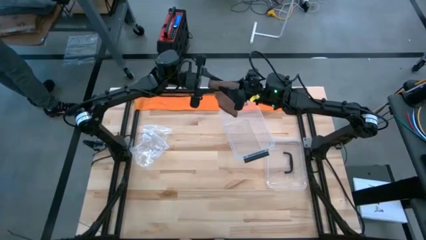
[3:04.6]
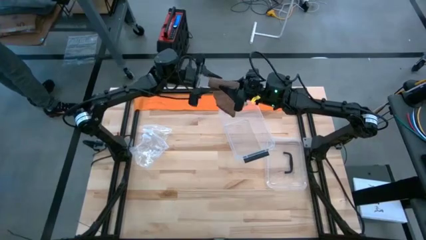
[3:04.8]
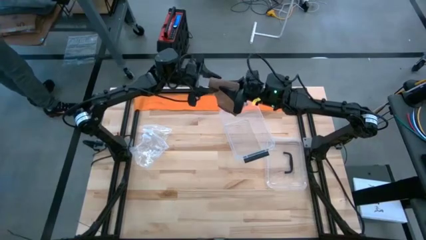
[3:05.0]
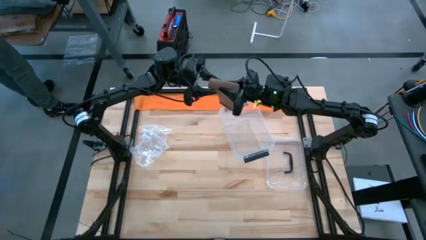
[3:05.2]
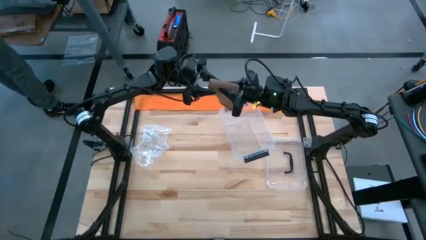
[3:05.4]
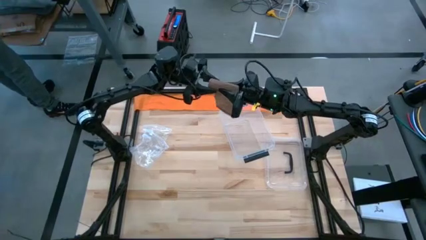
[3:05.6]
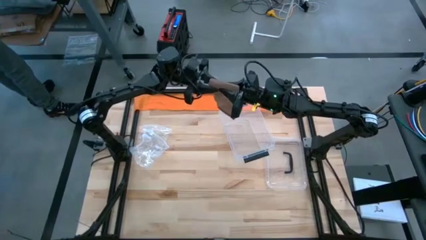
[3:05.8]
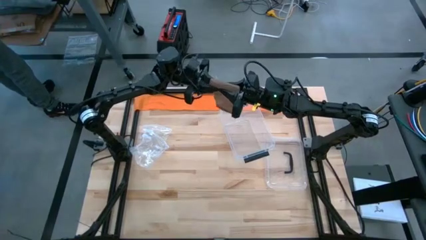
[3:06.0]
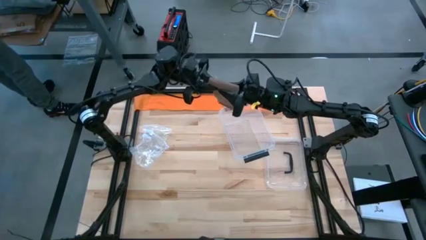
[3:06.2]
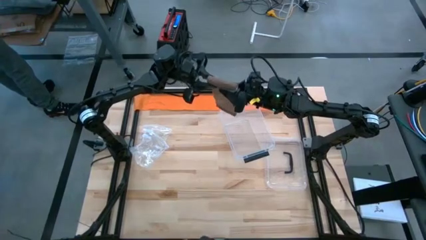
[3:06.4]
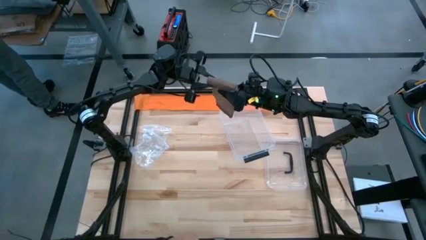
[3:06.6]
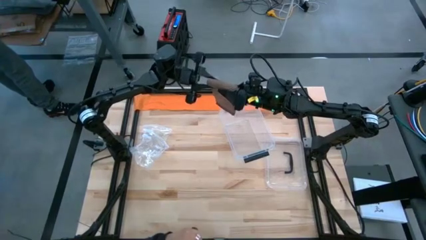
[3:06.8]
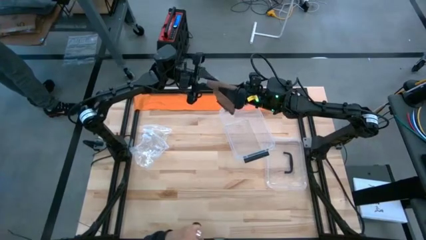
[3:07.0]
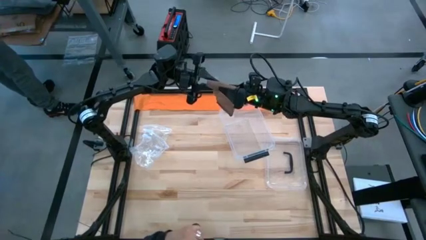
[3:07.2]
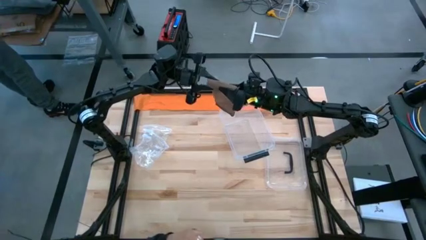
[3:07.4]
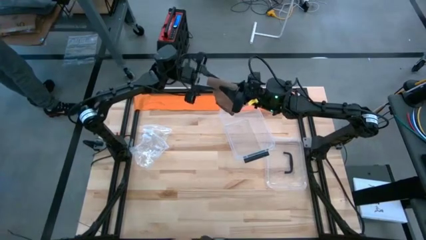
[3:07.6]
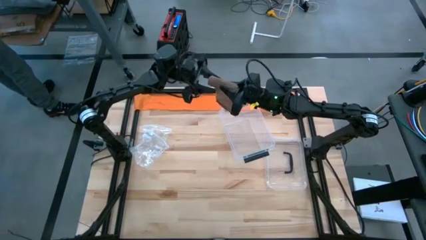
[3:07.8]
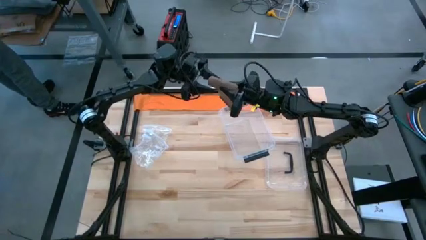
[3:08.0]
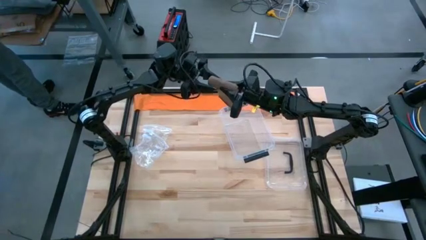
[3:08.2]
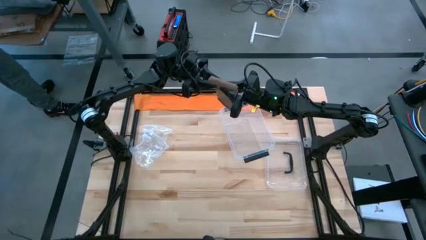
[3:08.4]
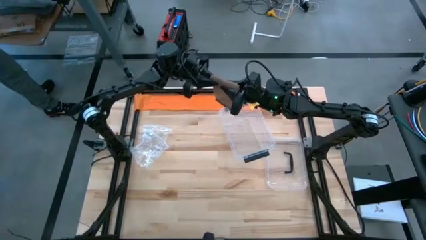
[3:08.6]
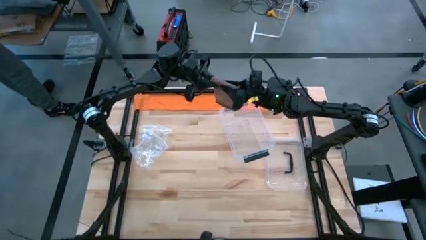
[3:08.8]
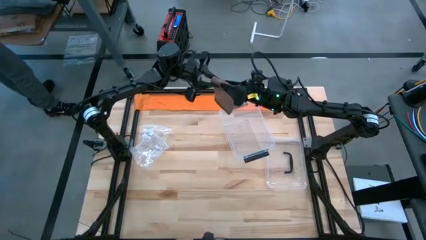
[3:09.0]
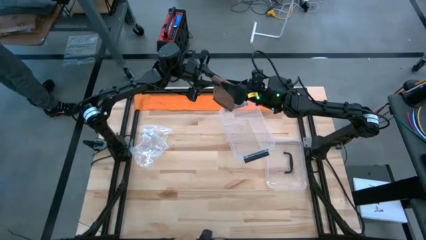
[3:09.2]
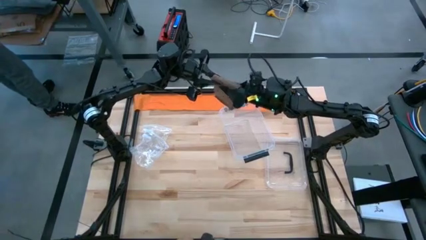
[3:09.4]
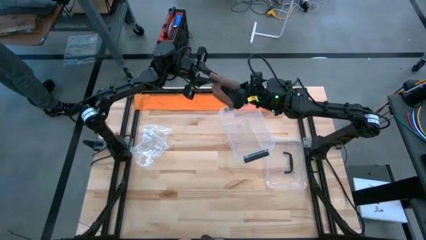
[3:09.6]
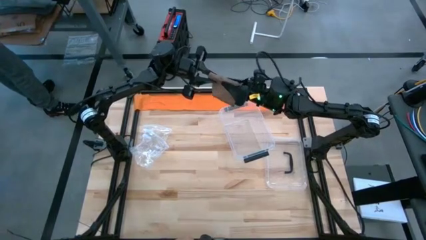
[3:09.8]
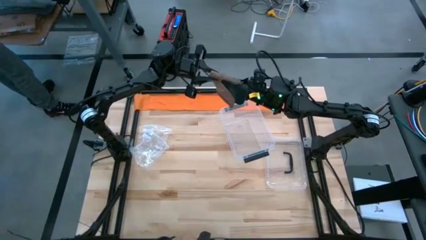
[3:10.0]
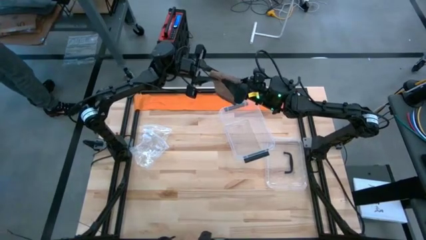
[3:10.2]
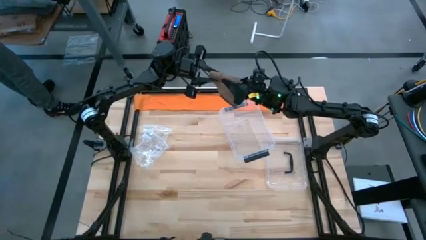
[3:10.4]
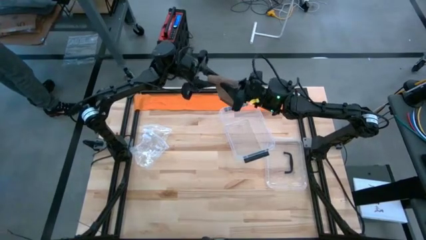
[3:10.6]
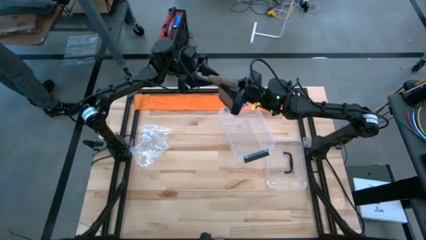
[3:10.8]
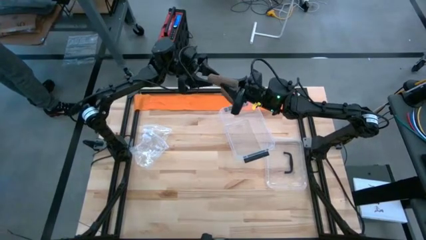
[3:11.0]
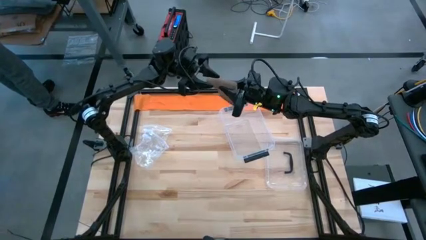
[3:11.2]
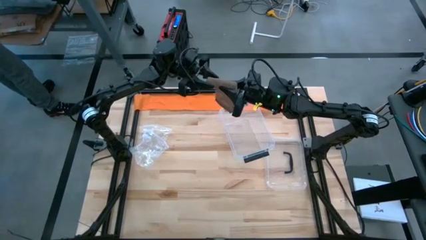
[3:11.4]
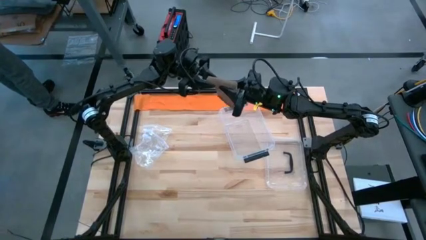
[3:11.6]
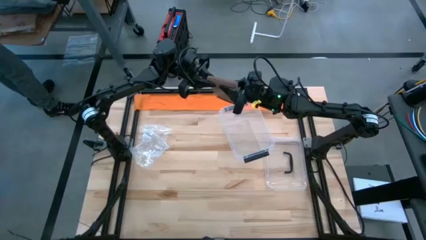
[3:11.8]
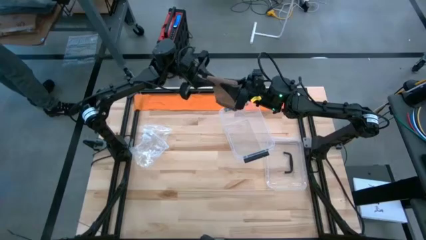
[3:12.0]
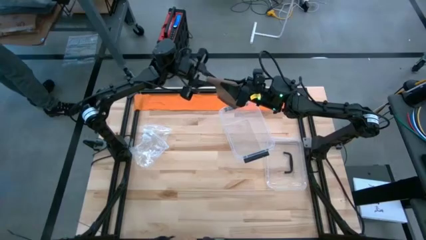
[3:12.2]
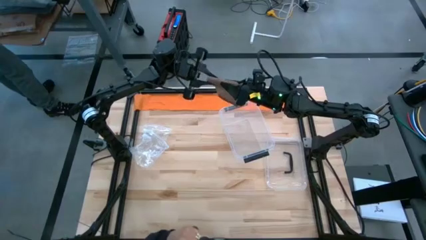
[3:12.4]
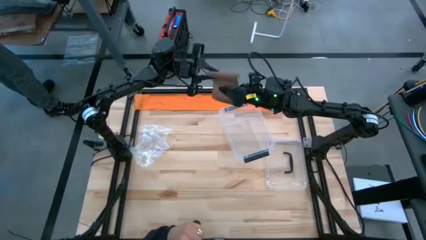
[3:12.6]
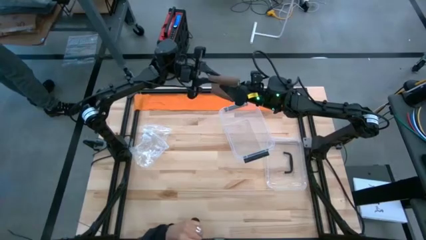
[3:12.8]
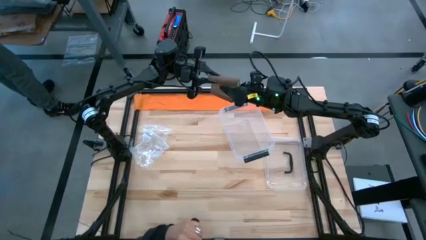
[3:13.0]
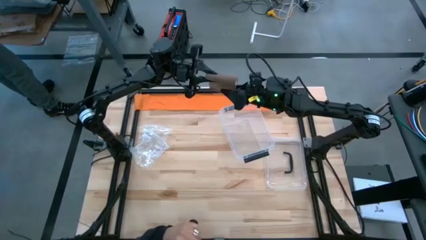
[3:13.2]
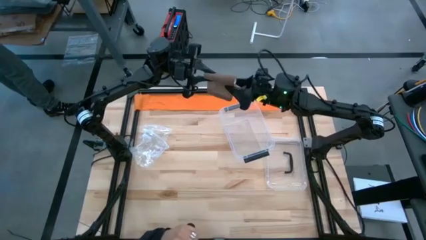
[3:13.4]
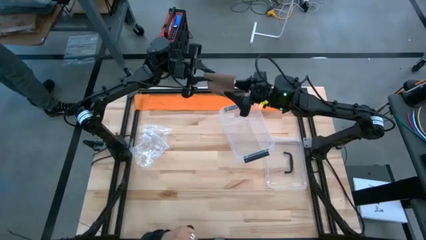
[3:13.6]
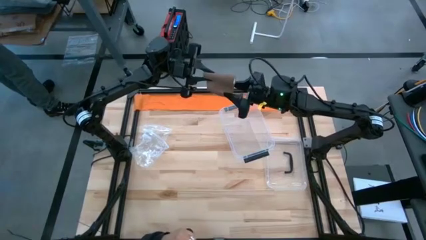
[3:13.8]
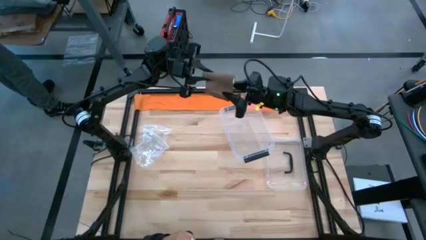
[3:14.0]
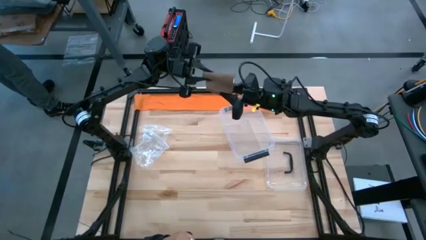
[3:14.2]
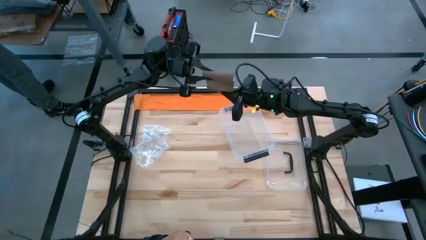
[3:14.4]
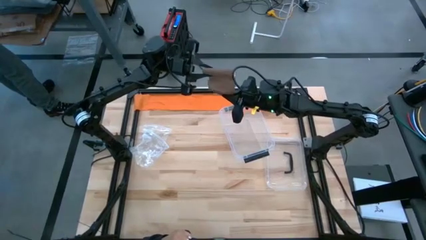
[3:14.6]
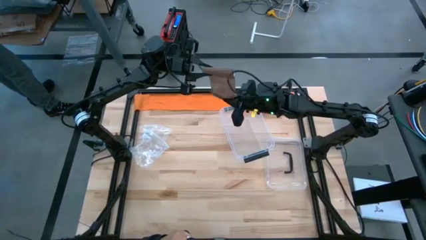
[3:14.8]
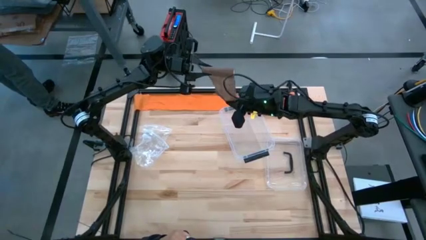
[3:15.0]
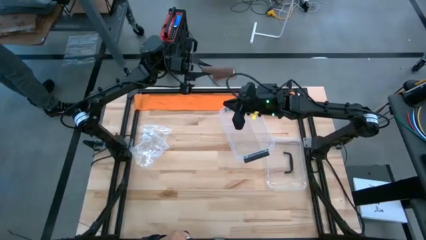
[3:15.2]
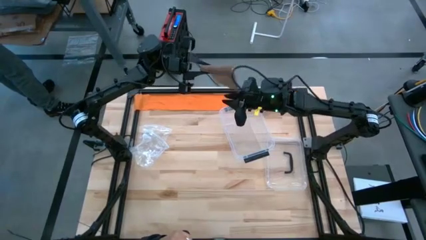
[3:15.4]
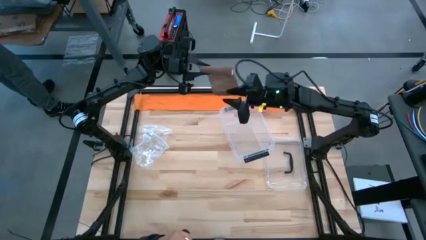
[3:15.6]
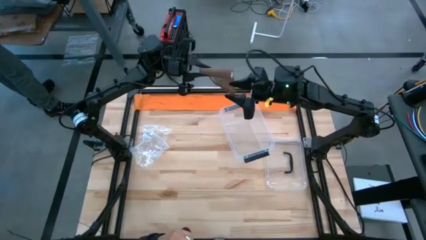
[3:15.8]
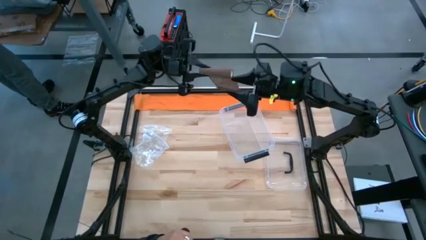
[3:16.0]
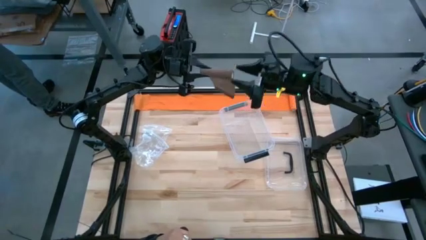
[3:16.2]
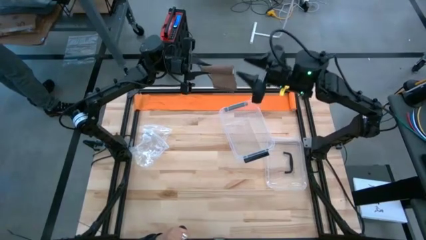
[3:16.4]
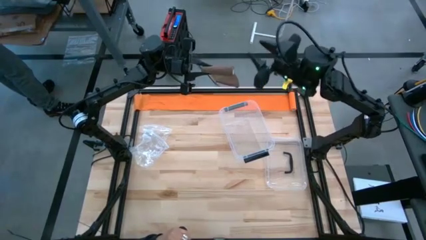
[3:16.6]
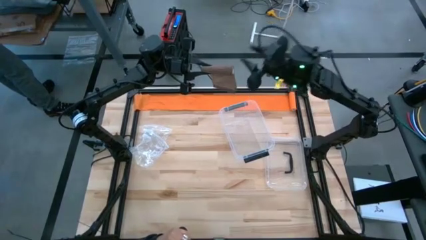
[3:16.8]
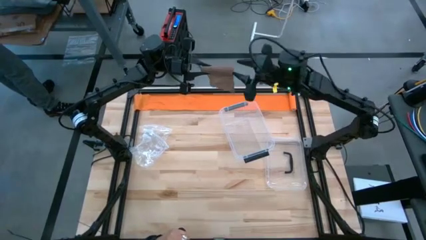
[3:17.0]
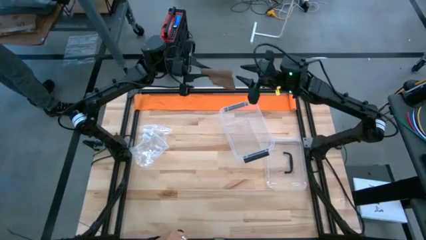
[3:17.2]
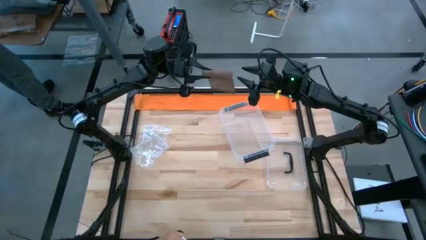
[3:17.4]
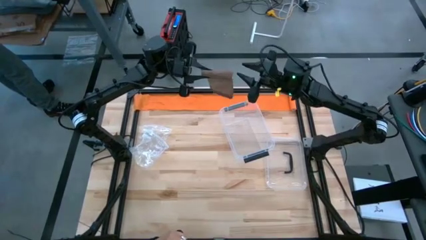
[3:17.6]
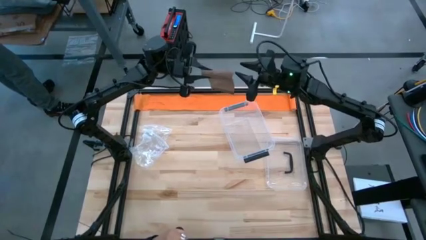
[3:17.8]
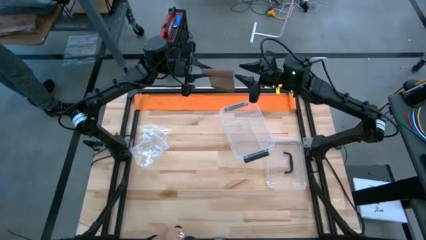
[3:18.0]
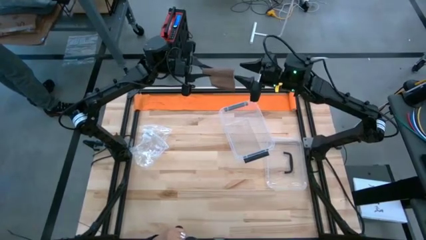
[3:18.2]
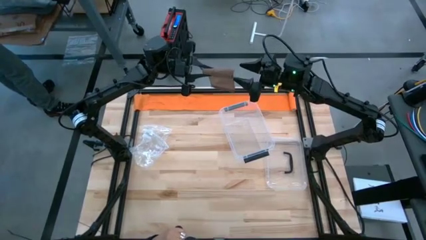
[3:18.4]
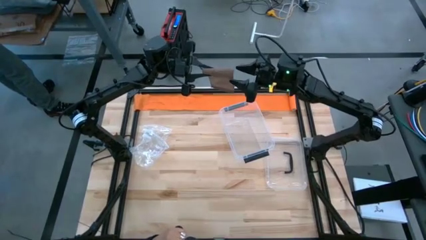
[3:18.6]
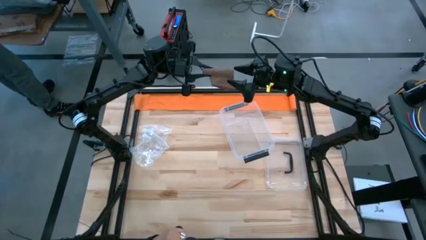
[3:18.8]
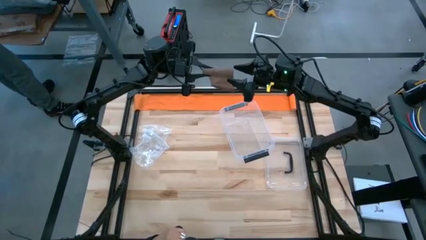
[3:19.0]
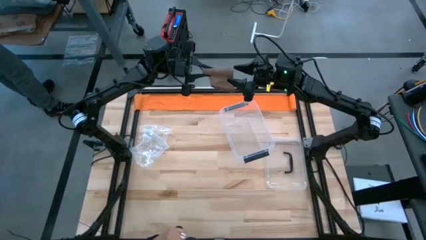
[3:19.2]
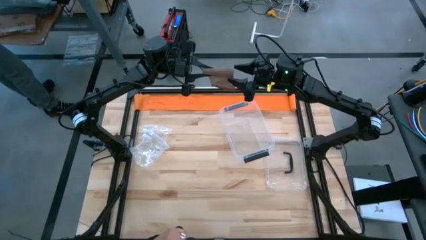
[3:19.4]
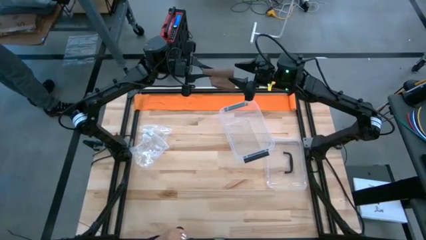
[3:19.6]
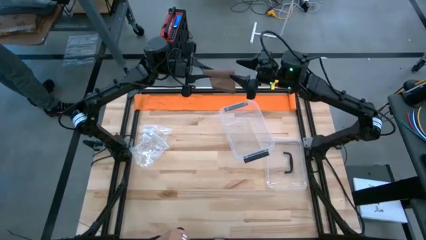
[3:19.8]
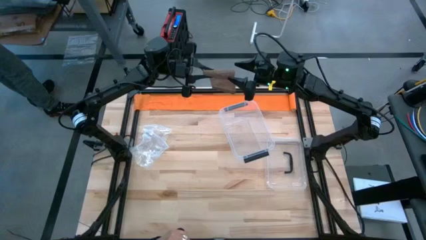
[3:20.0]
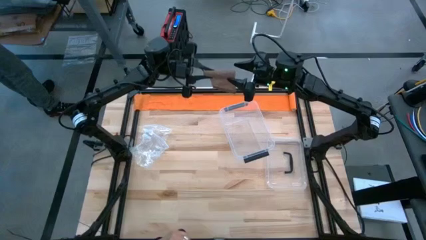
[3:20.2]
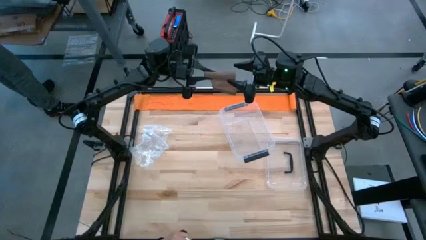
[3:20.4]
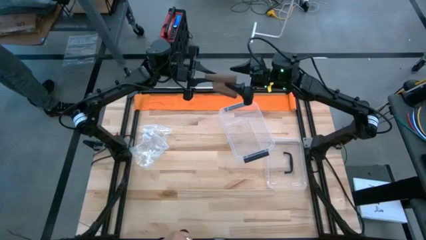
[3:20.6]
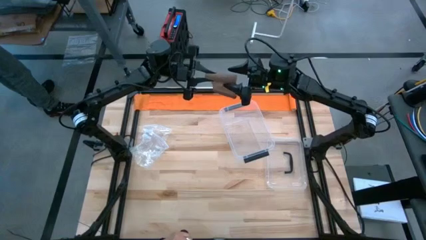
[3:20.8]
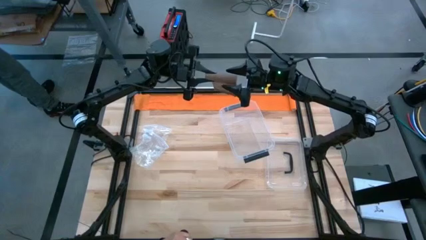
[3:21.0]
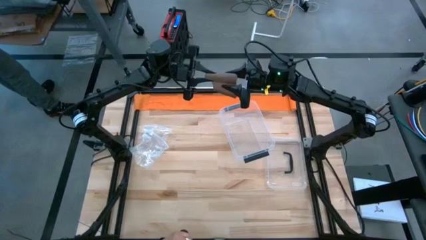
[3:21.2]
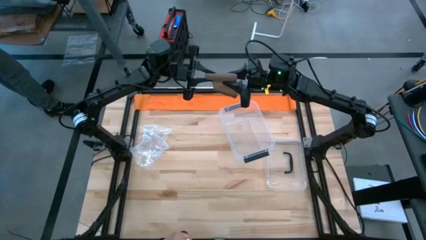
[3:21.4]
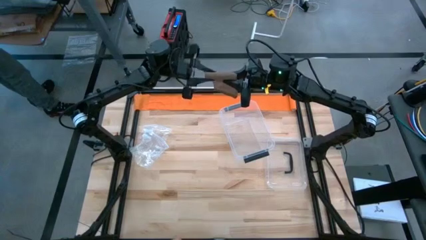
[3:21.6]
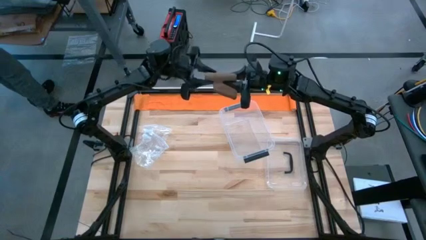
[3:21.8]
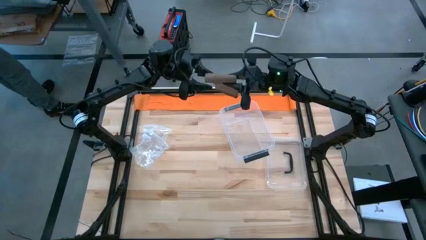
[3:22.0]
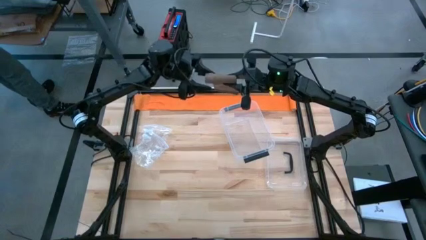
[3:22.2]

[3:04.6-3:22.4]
Task: Roll bandage
Roll the brown bandage
